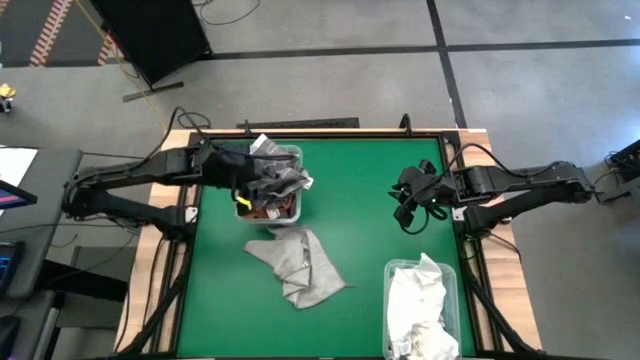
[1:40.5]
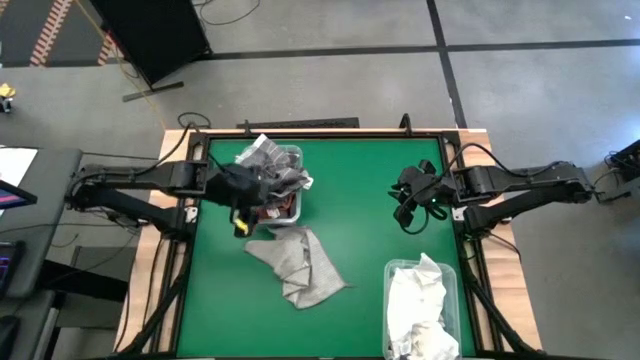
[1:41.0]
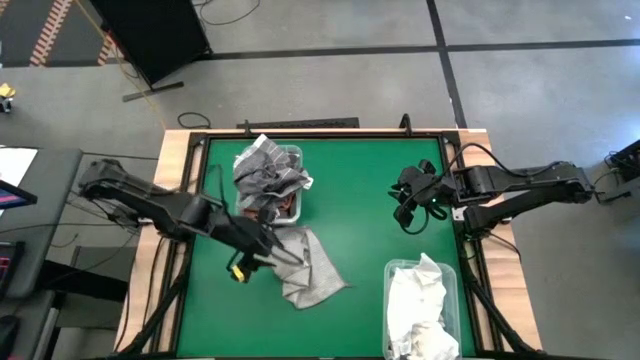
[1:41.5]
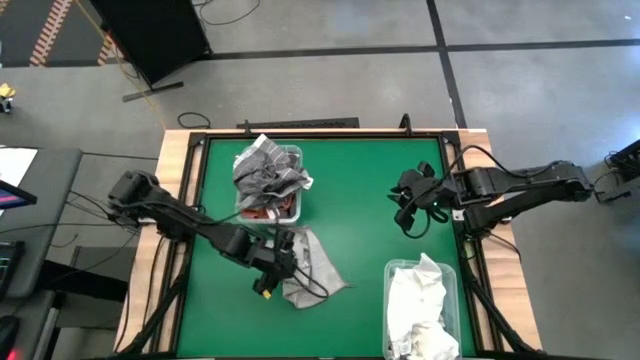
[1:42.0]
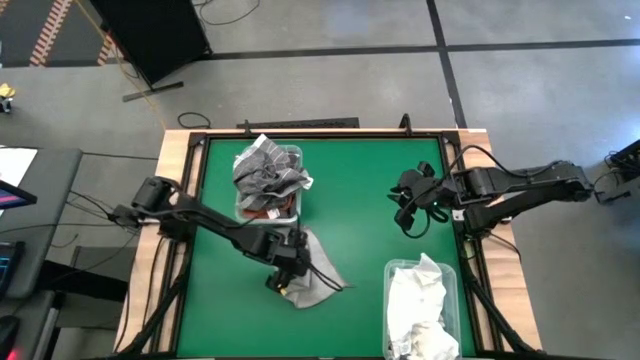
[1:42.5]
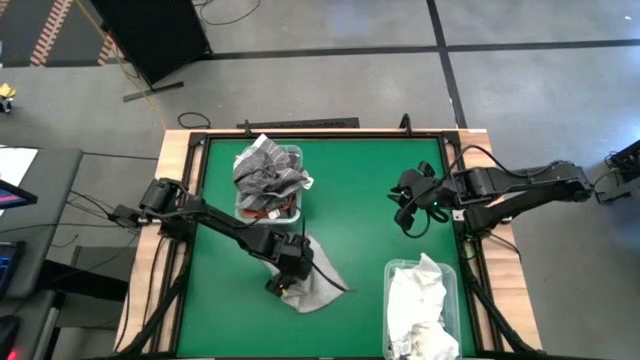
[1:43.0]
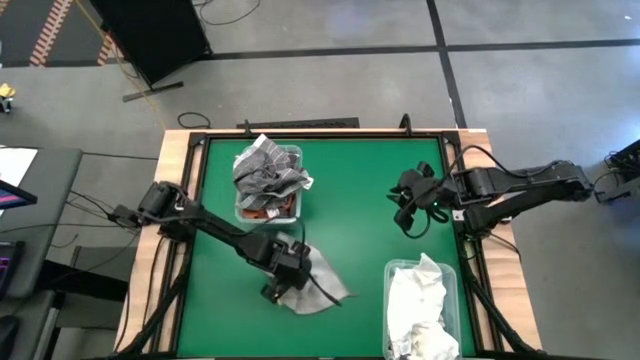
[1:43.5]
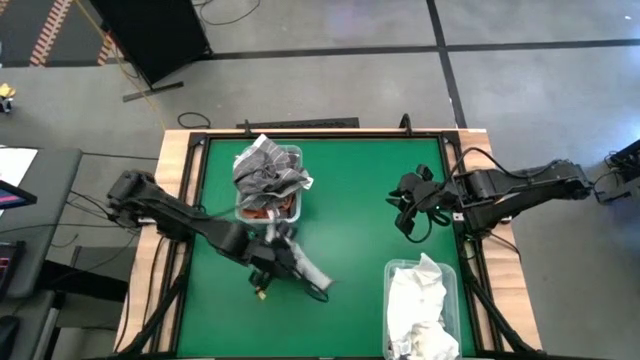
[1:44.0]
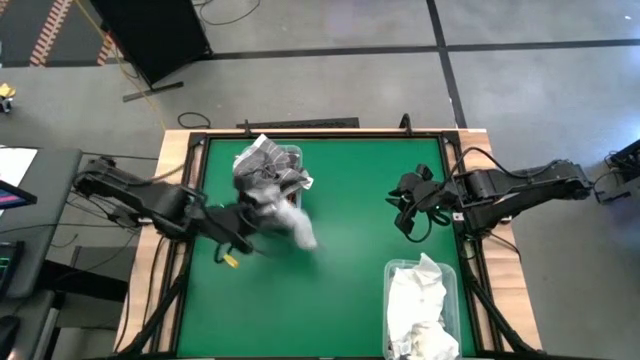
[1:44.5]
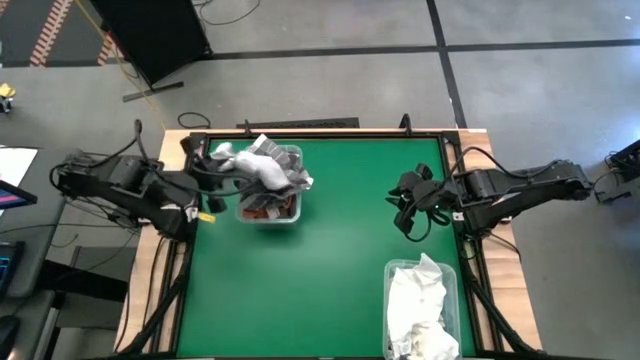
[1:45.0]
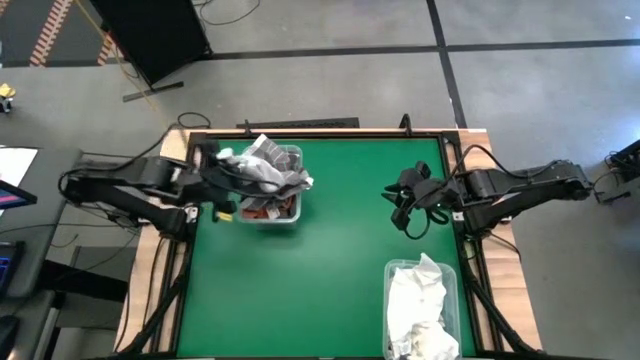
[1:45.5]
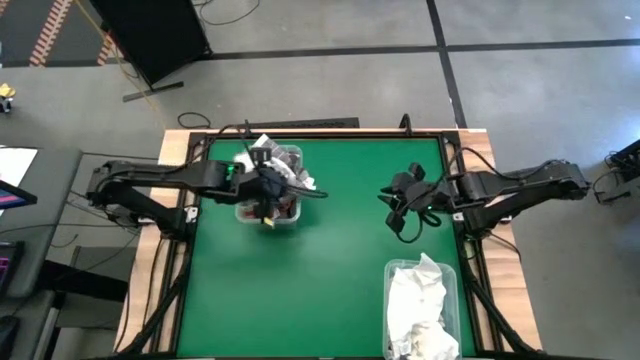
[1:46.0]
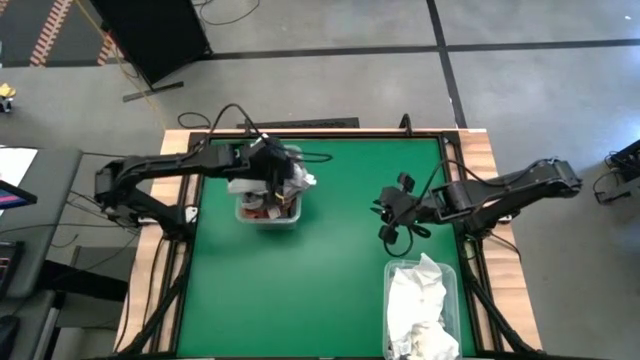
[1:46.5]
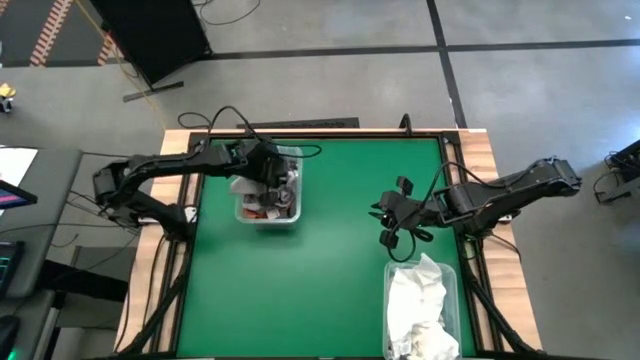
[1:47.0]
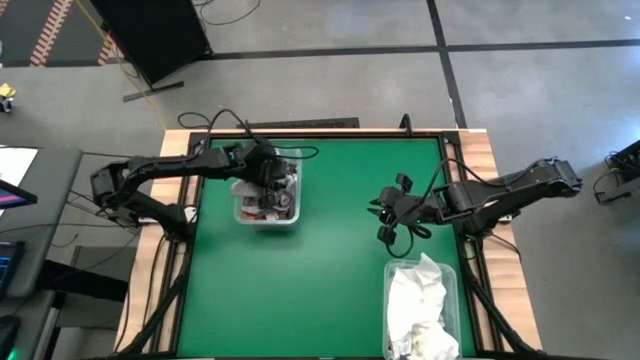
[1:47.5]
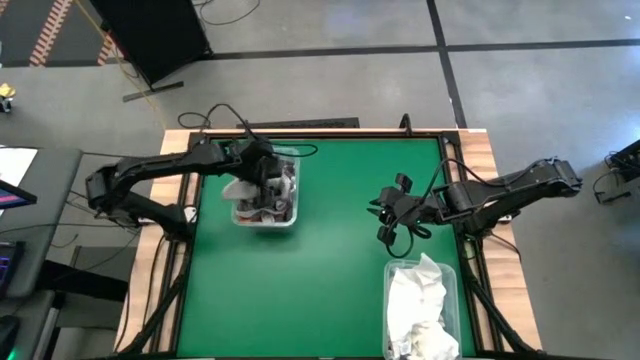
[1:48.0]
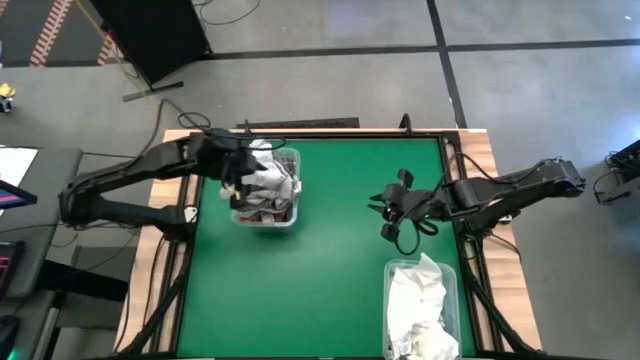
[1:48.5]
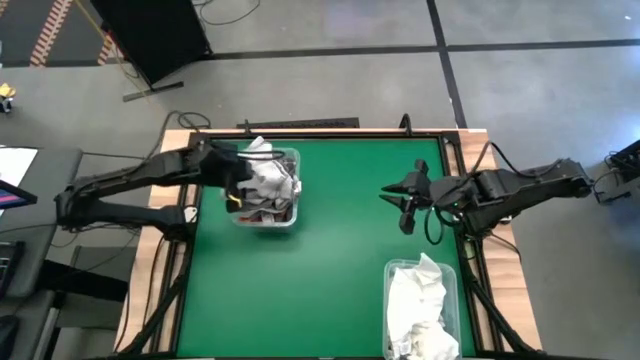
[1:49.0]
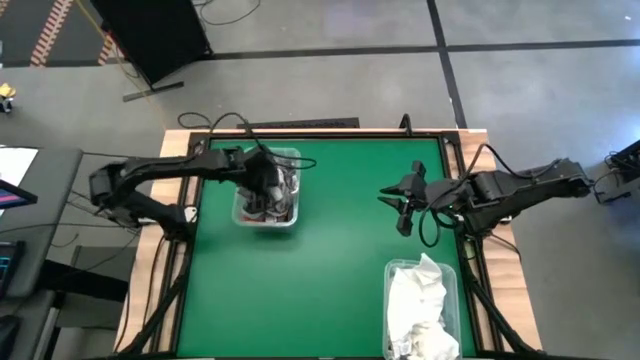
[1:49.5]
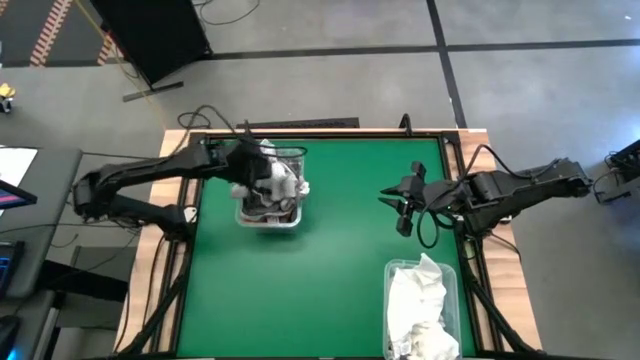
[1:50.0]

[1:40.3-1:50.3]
Task: Sort towels by color in basket
Put the light gray towel into the top transparent bin

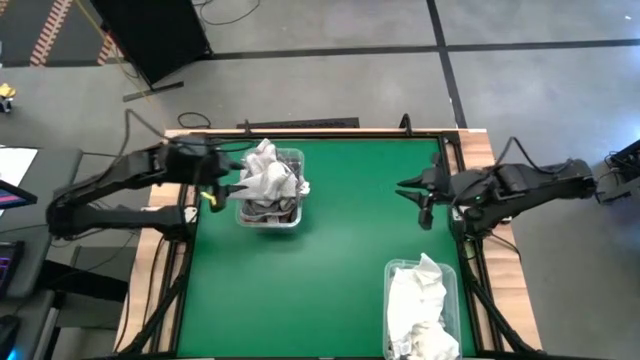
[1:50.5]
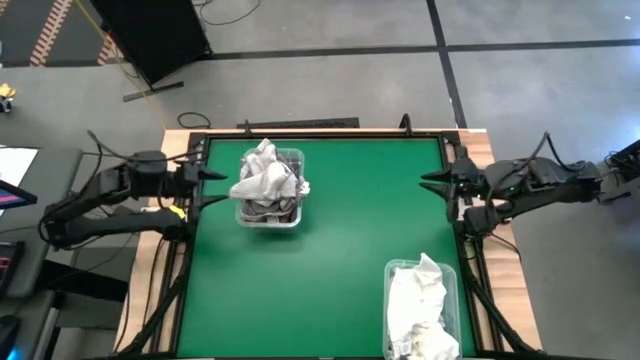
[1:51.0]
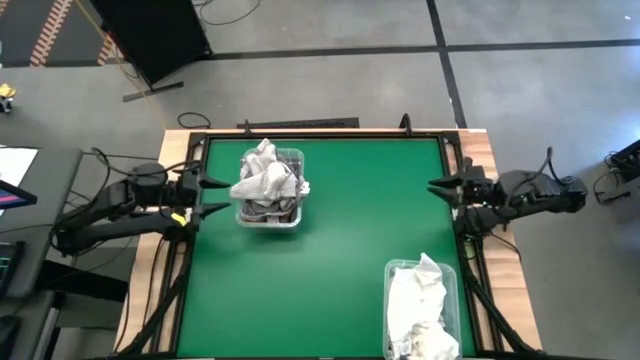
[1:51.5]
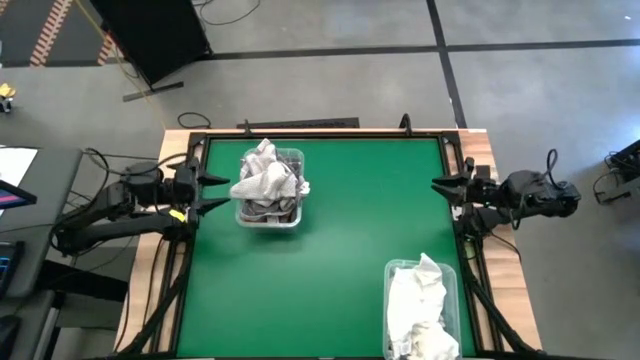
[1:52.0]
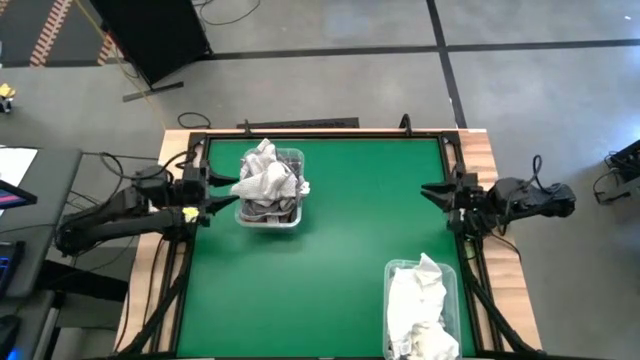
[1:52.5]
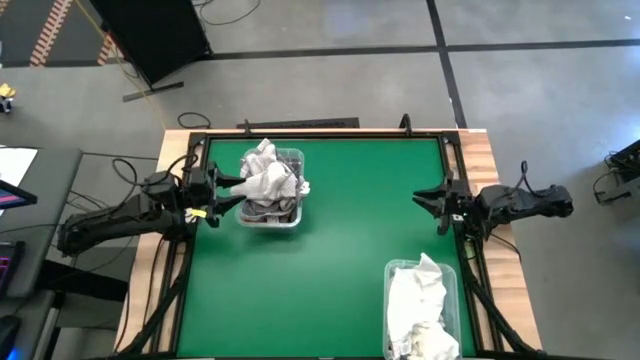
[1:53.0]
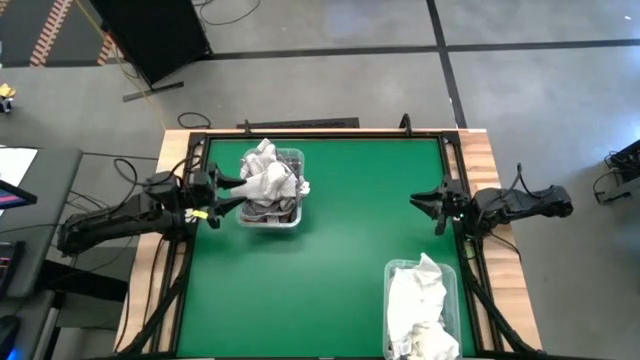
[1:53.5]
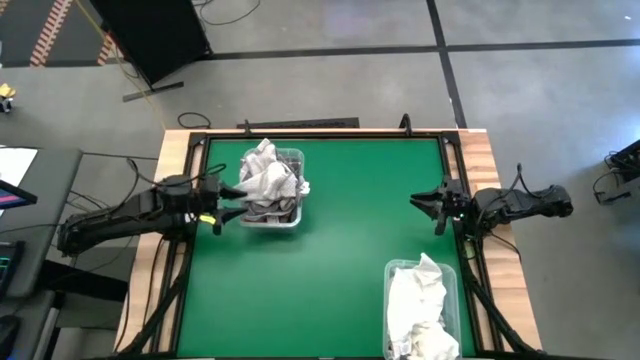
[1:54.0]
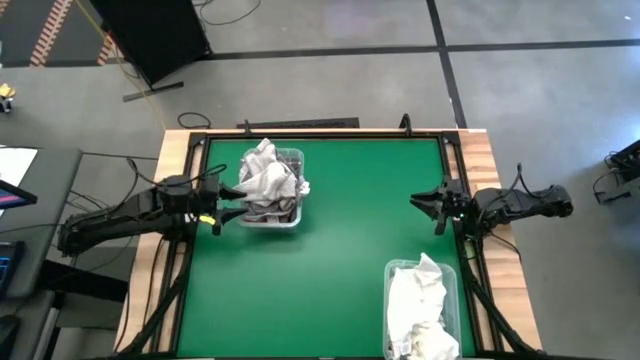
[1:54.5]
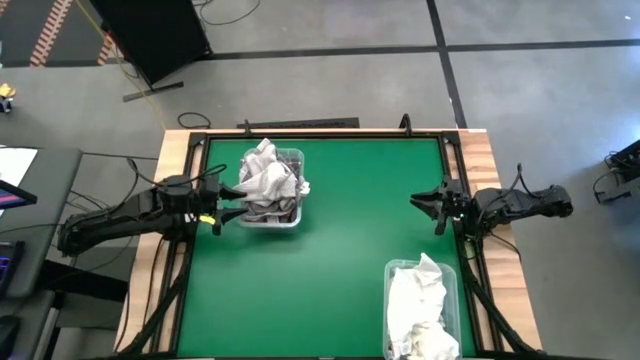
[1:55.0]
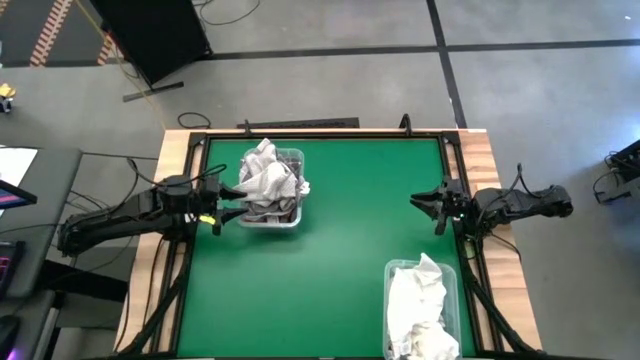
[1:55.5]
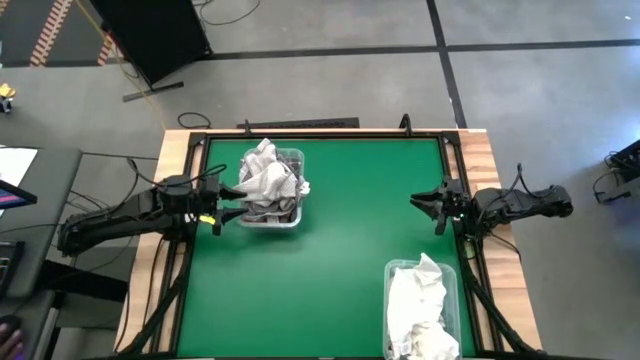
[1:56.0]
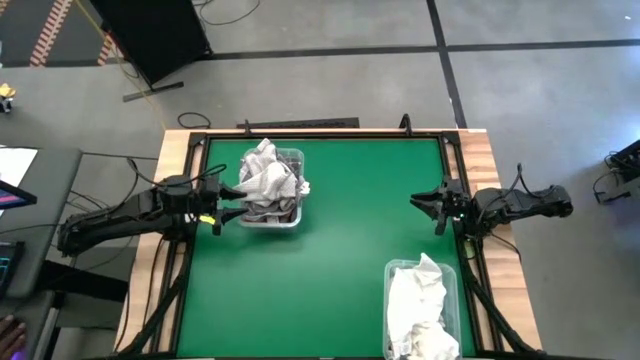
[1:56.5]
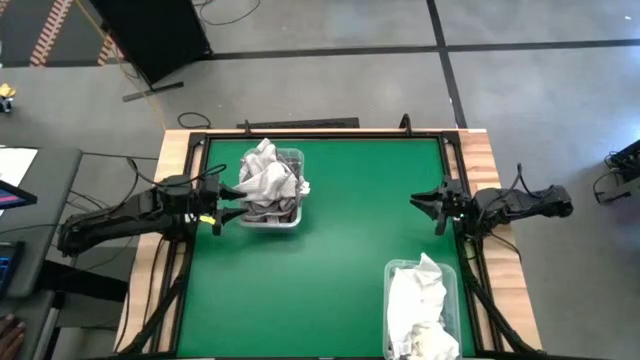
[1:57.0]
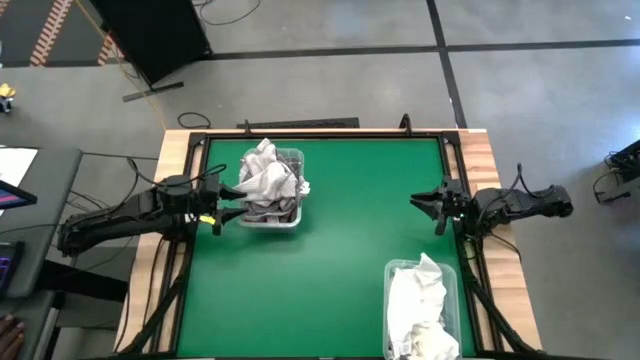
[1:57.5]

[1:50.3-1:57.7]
Return to Home Position

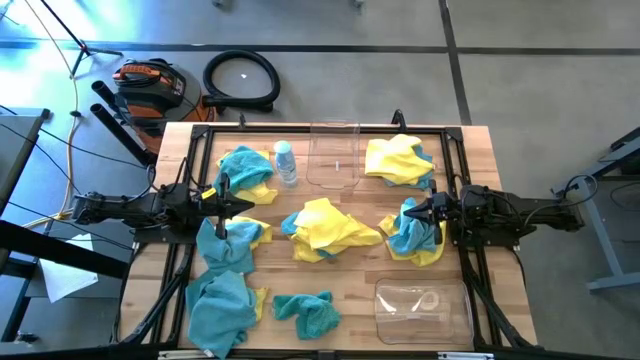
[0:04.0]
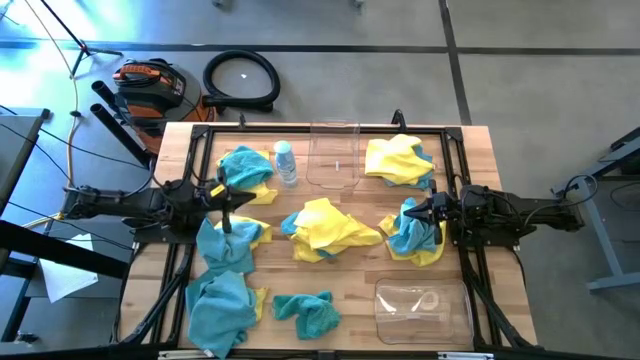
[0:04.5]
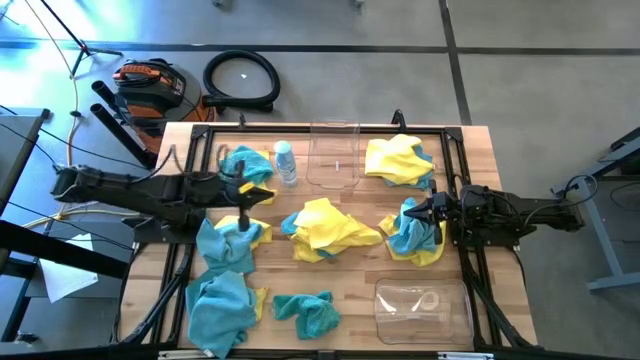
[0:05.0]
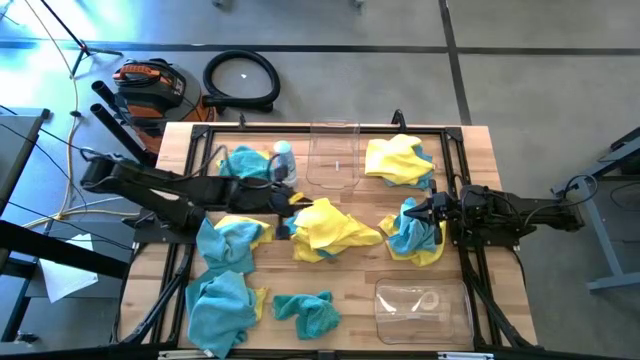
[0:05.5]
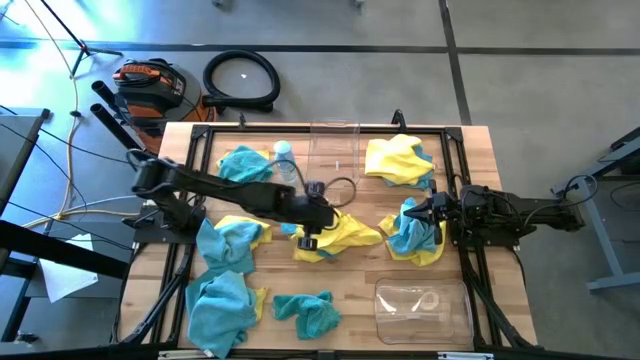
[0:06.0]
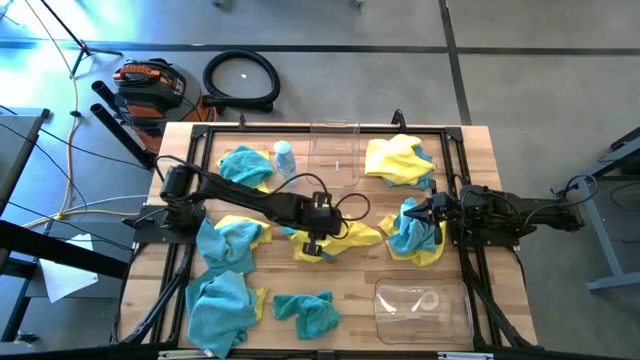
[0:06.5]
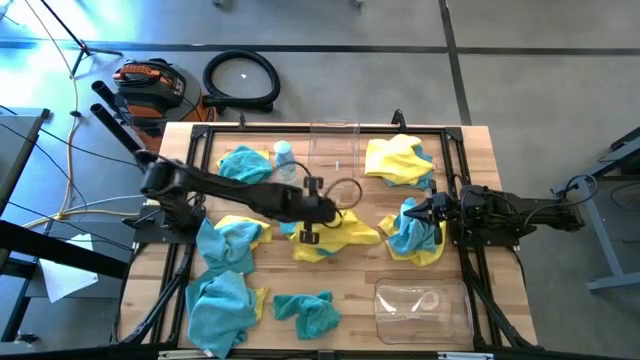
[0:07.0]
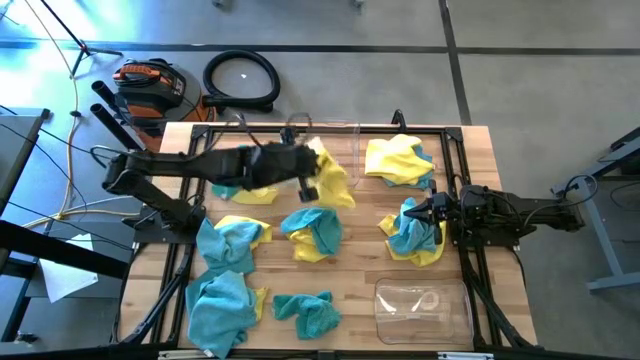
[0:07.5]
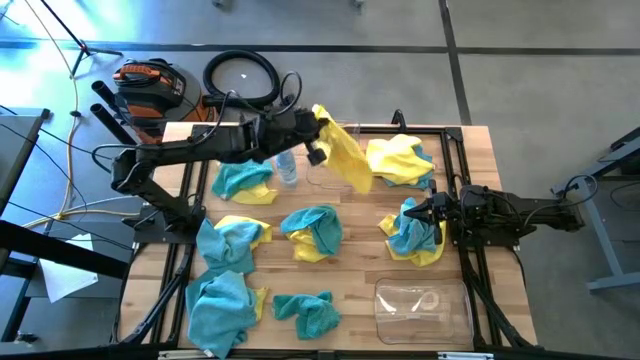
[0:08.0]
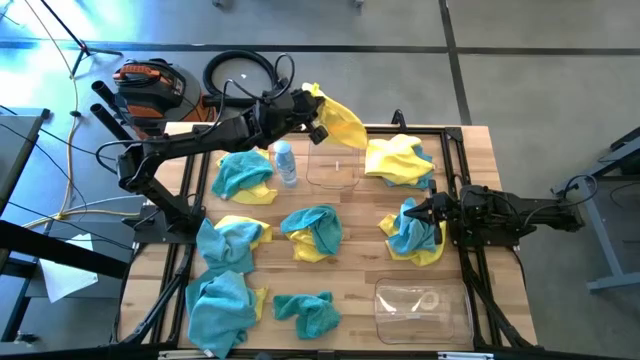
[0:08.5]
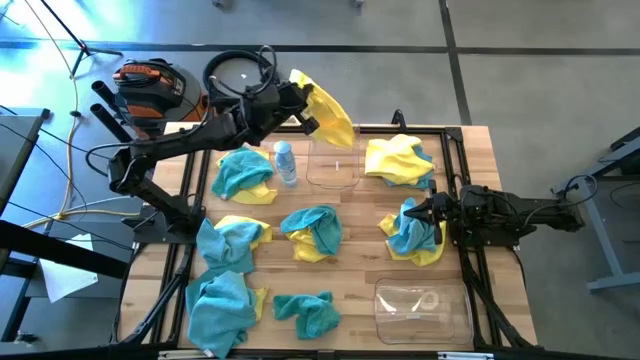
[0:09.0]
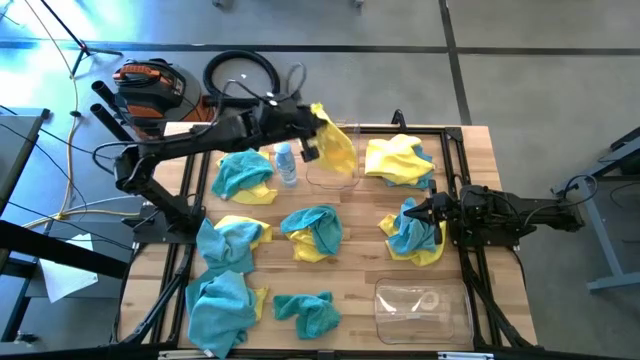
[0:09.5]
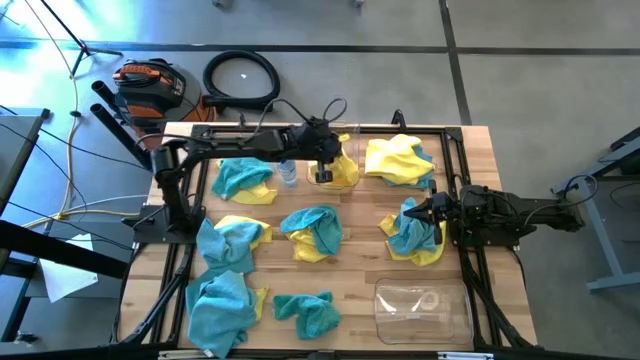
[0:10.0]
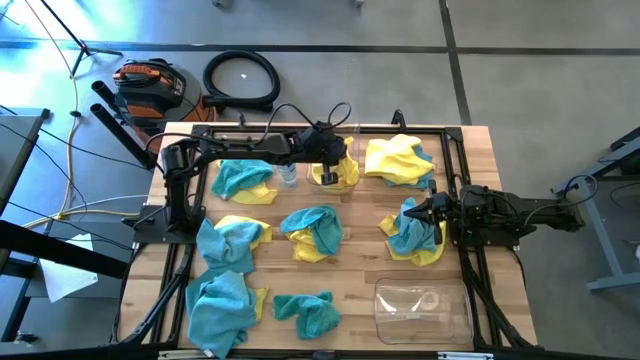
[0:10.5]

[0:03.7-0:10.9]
Task: Sort microfiber towel by color & place in baskets
Put the yellow towel into the top transparent bin
